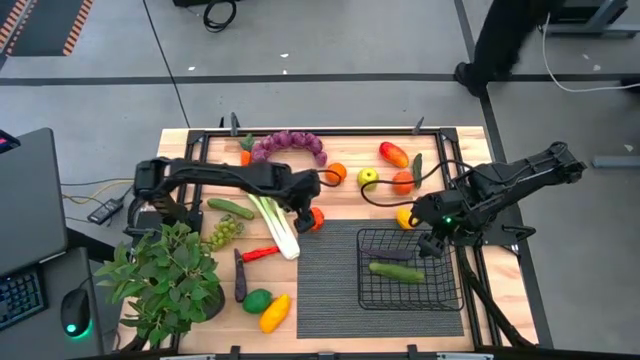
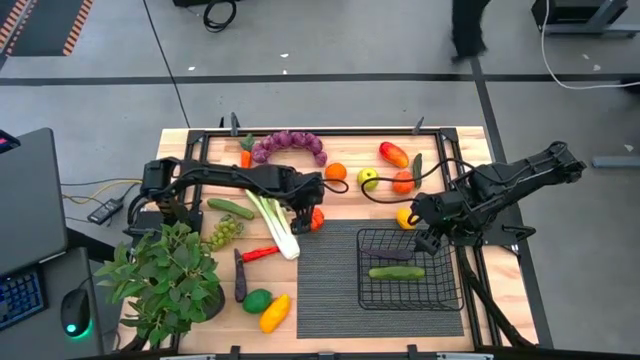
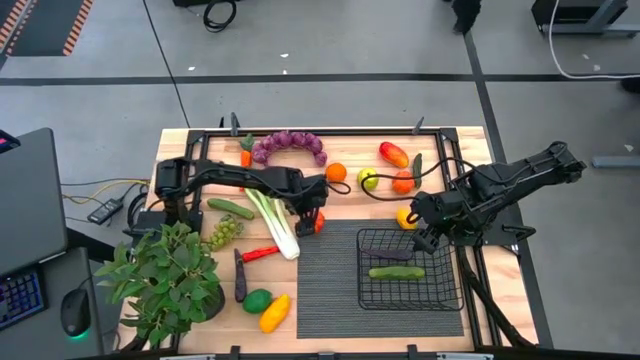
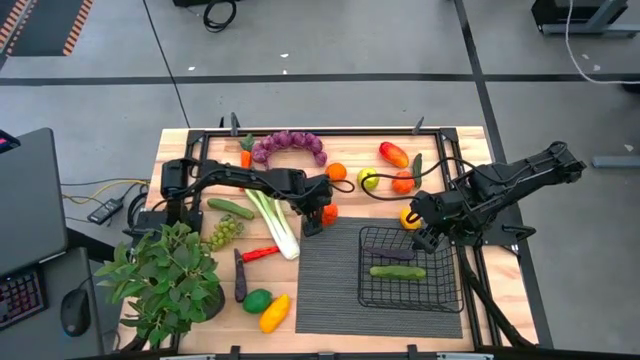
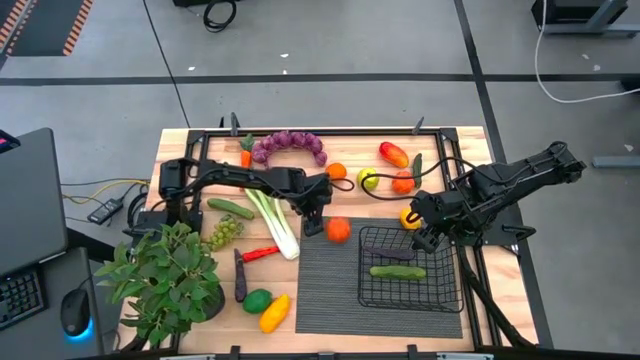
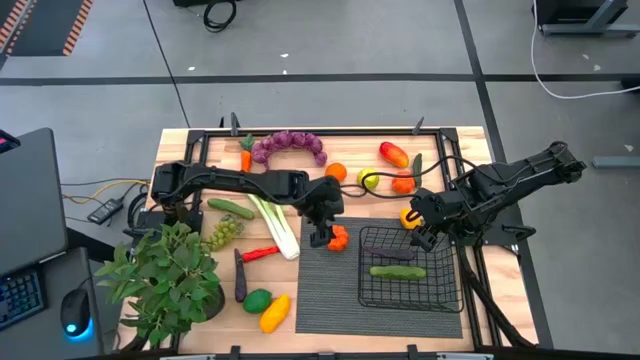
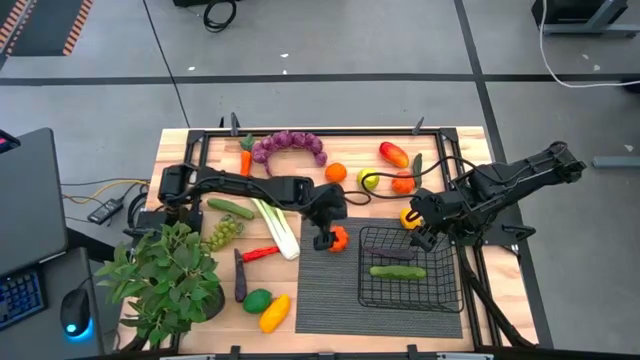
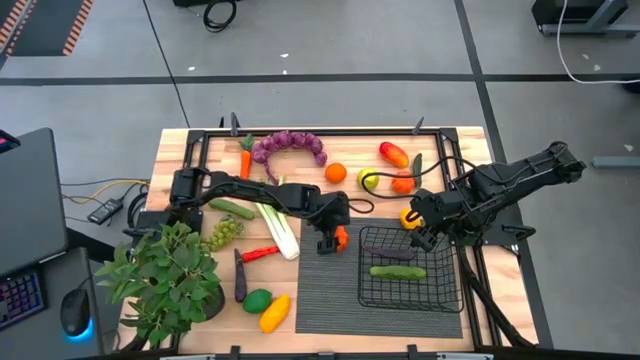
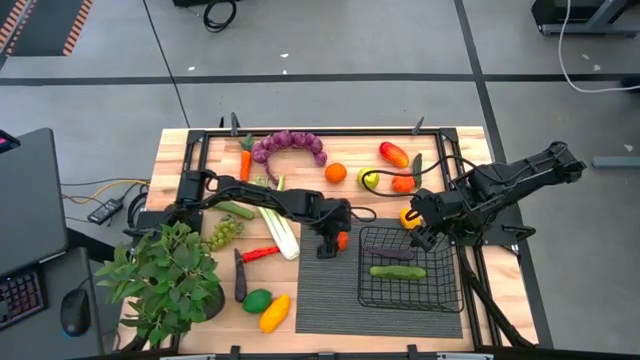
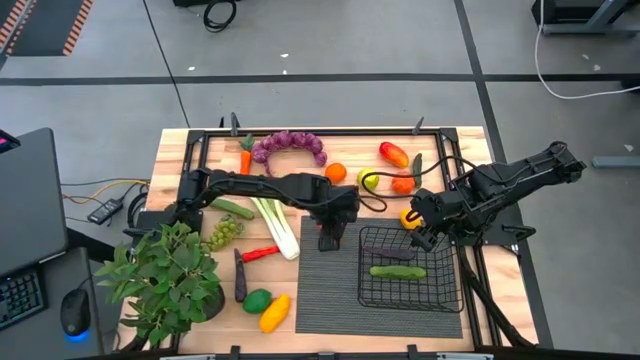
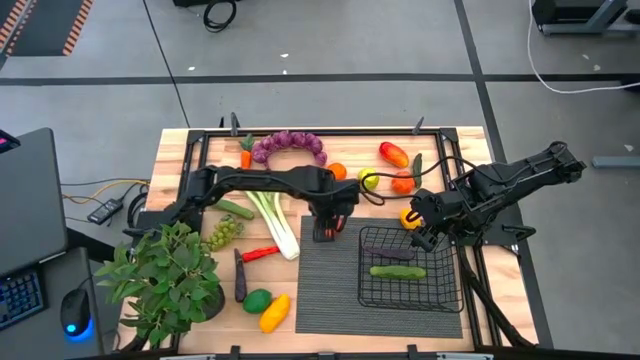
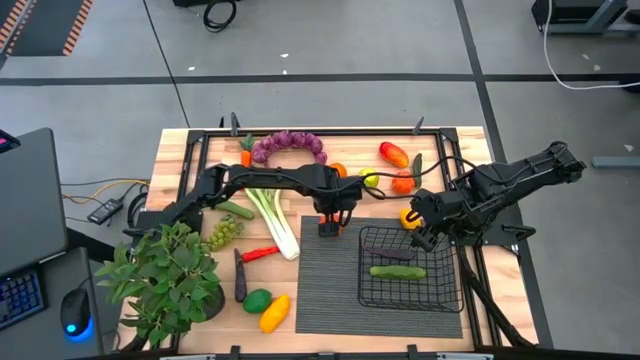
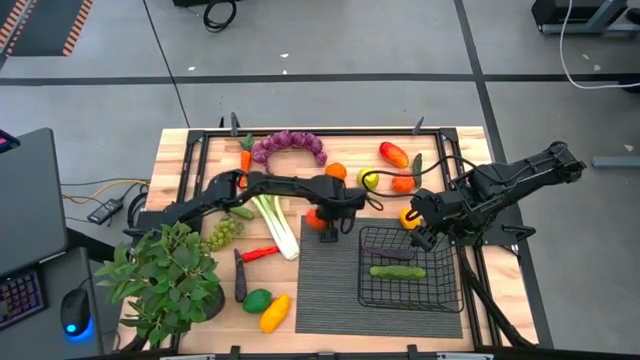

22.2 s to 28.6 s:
Task: Build produce basket
Put the bottom tangerine into the wire basket

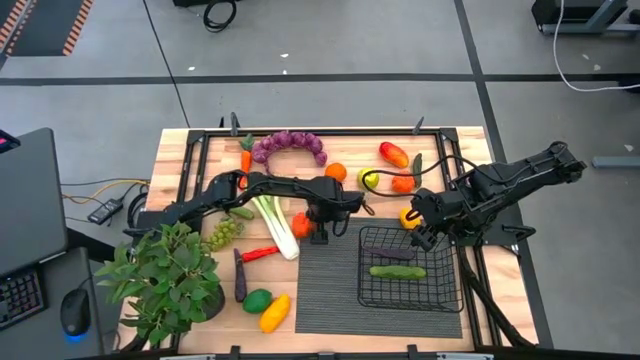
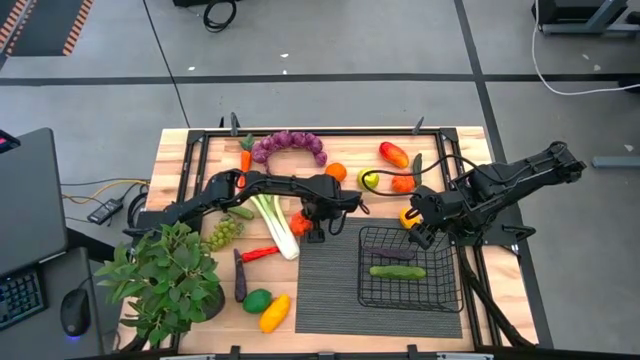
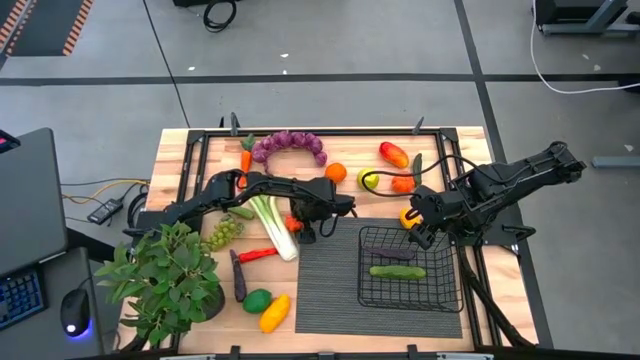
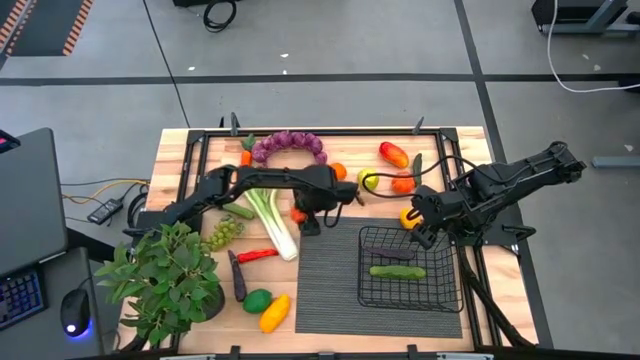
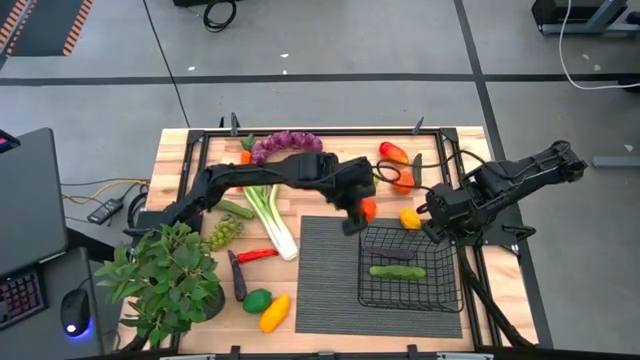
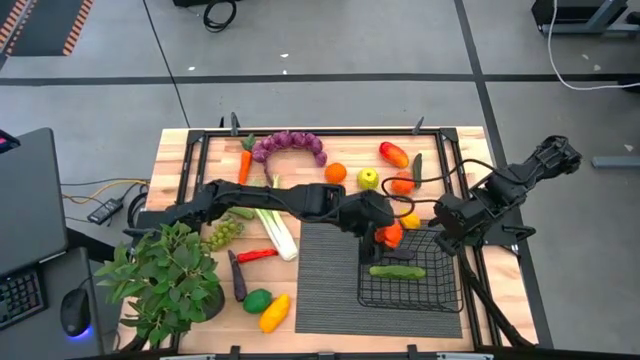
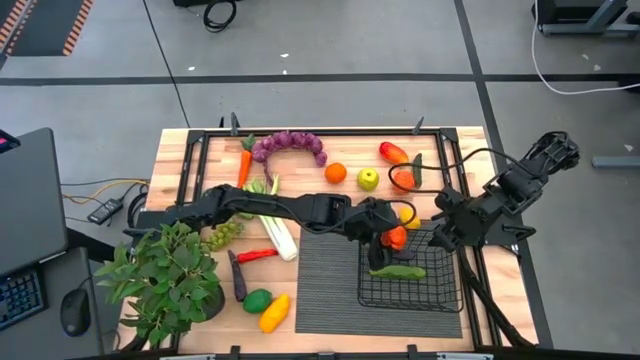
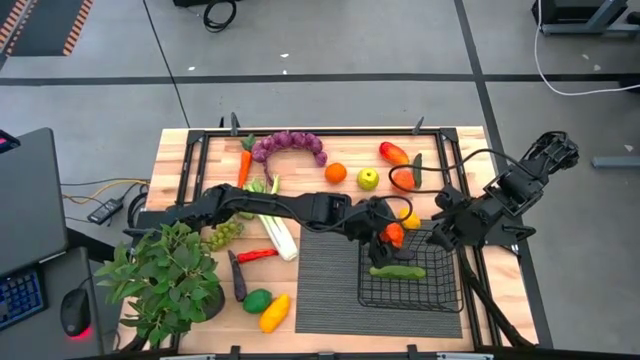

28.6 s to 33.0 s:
Put the bottom tangerine into the wire basket

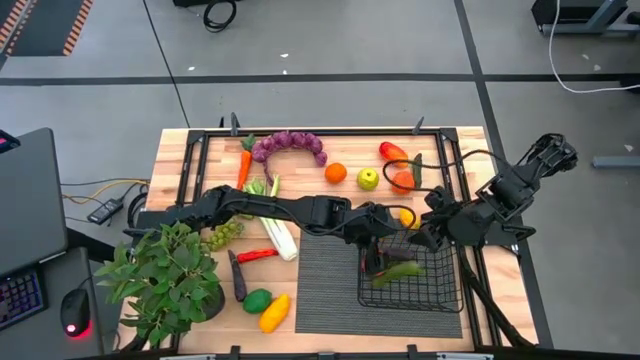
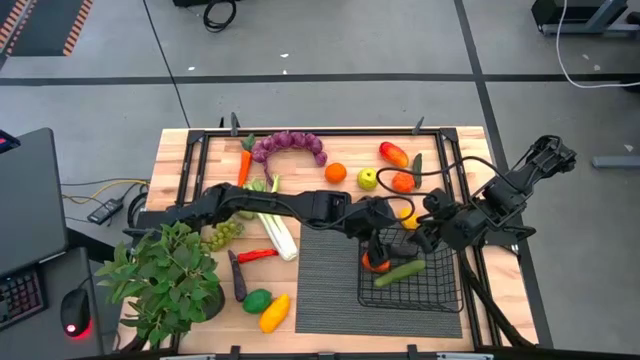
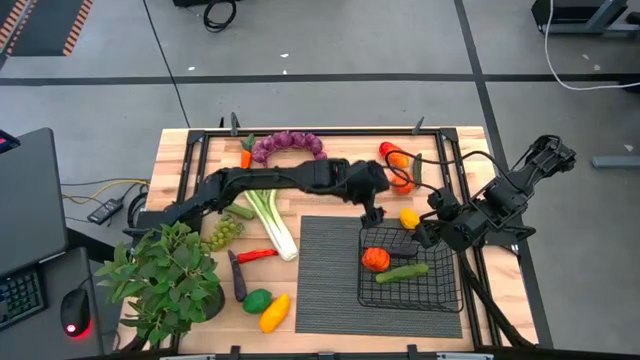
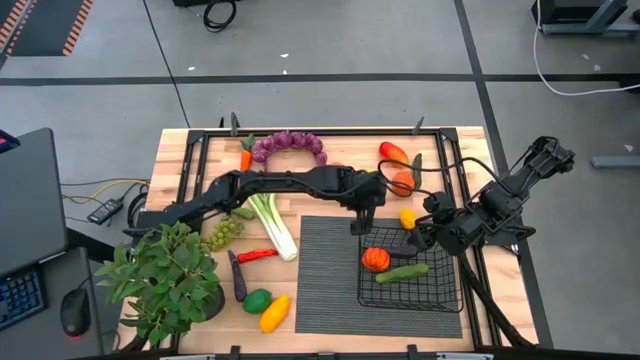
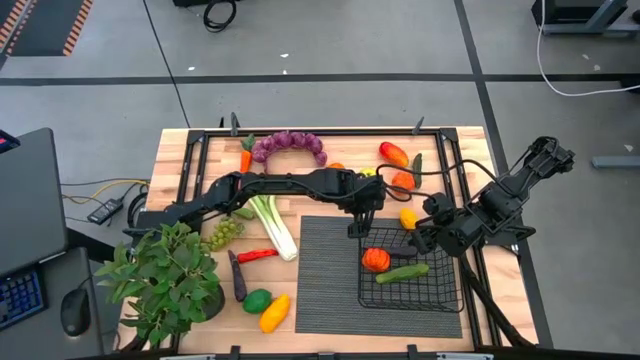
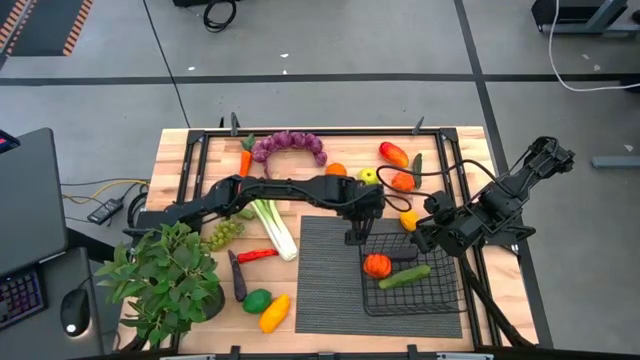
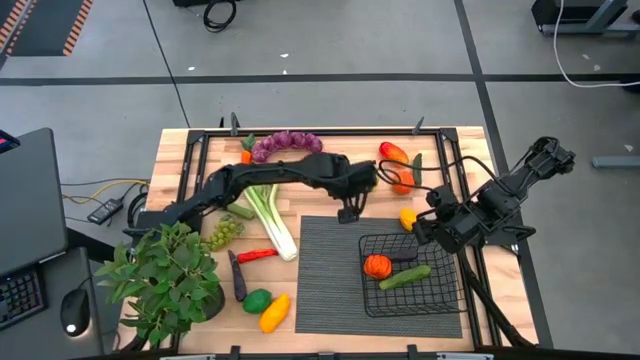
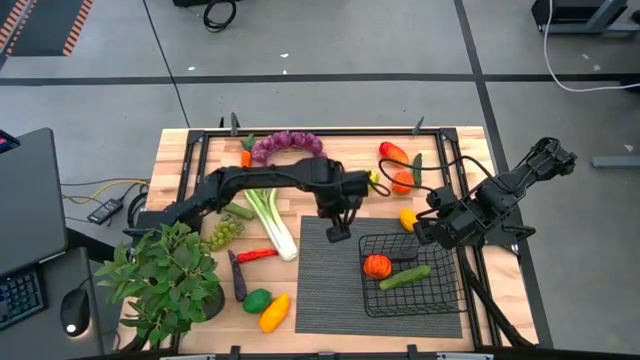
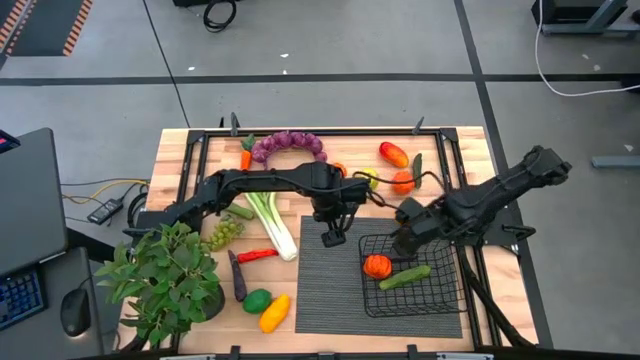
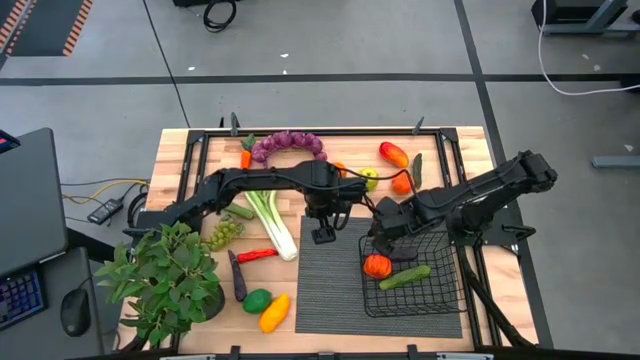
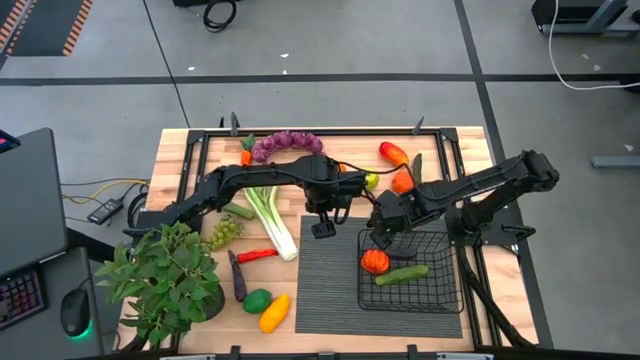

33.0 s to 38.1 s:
Adjust the wire basket

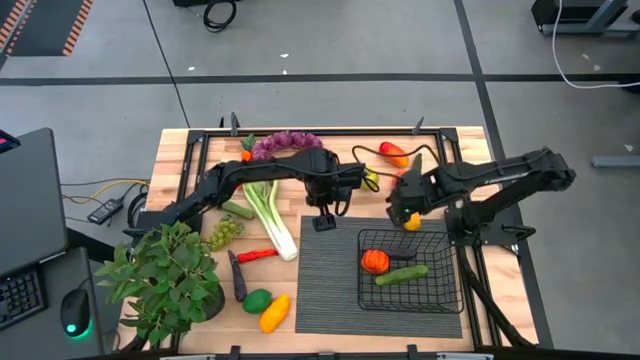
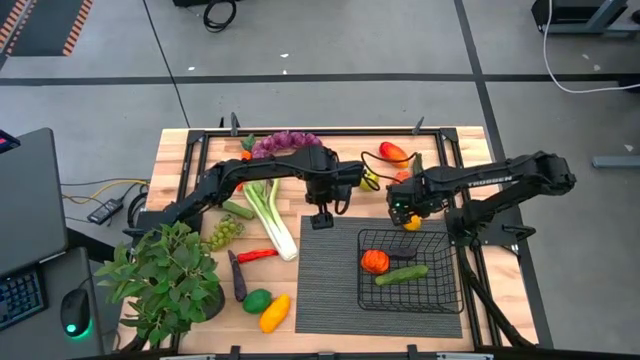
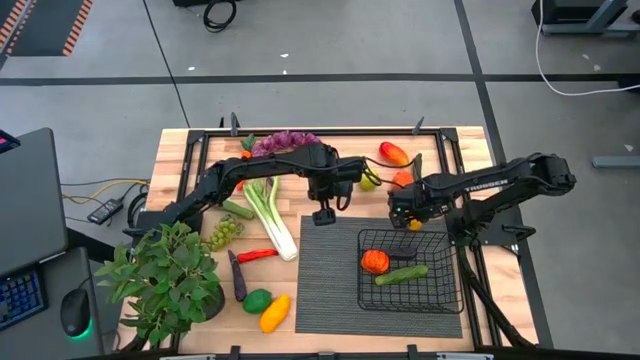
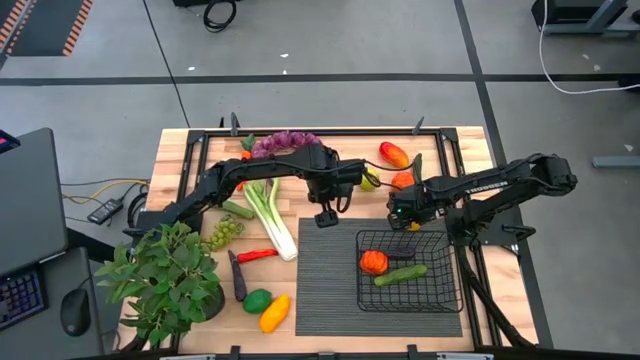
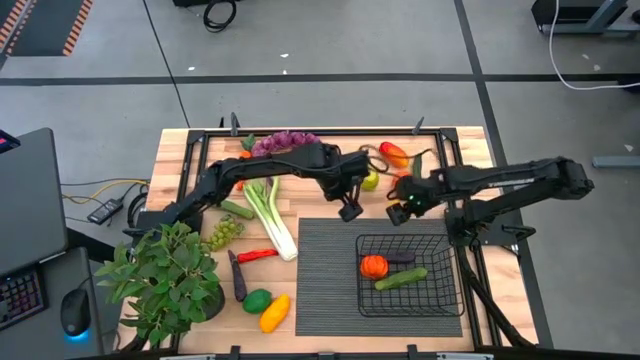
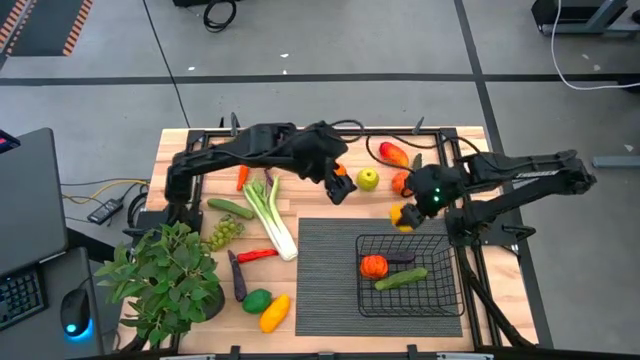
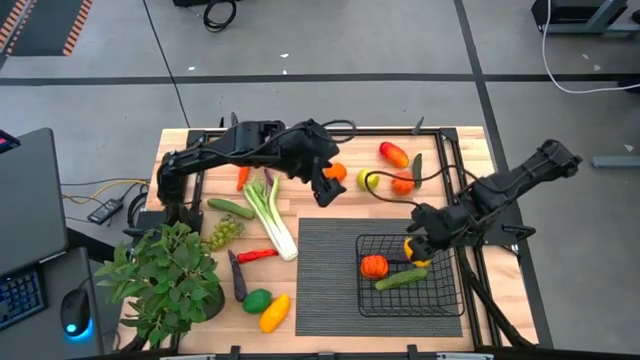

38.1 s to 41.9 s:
Put the lemon into the wire basket

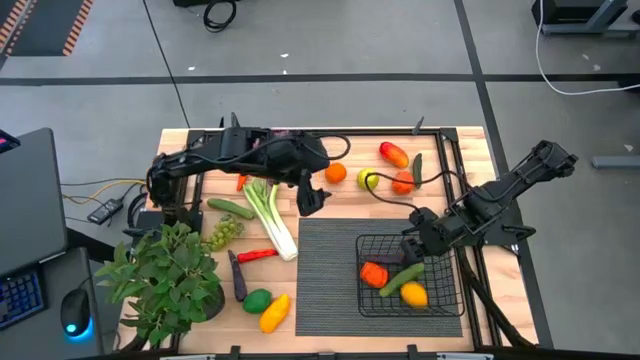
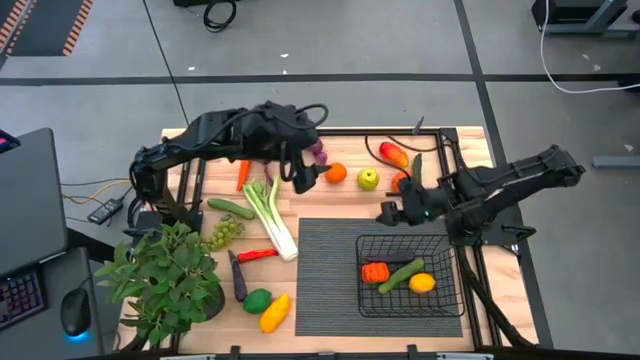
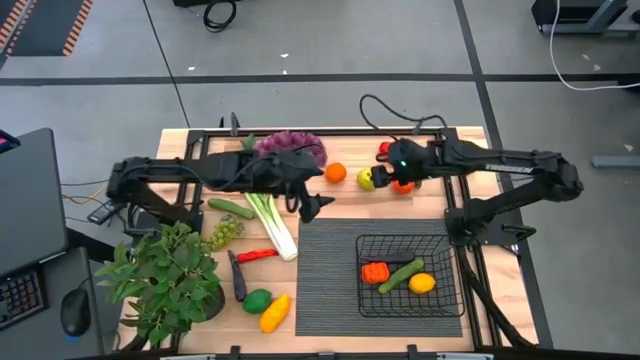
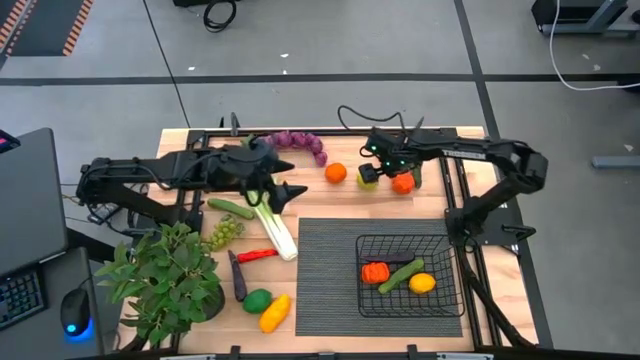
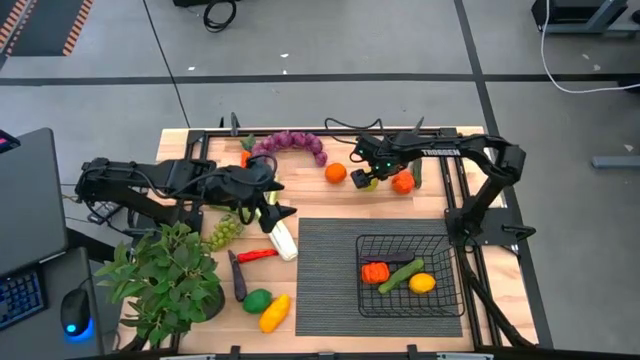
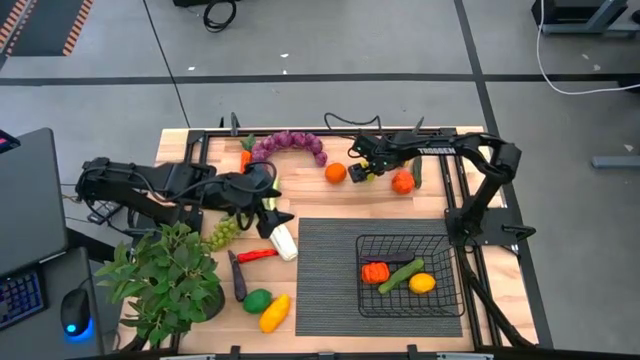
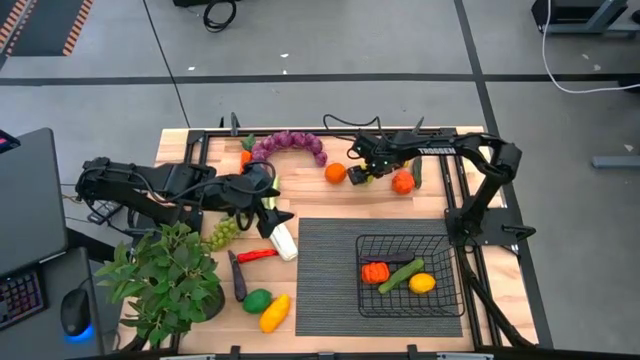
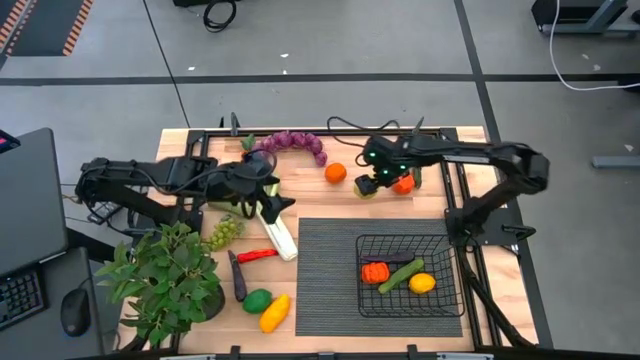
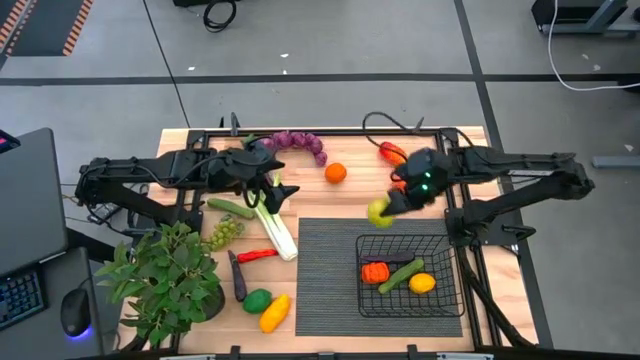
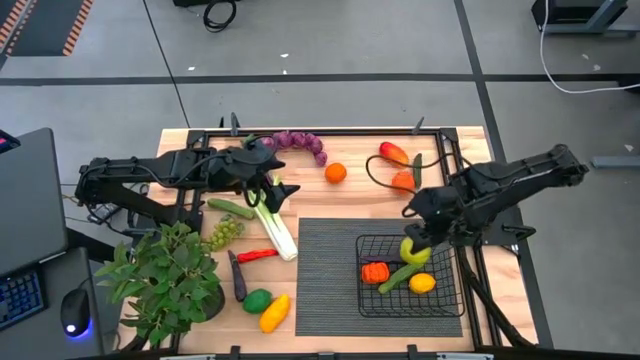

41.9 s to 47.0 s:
Put the green apple into the wire basket
